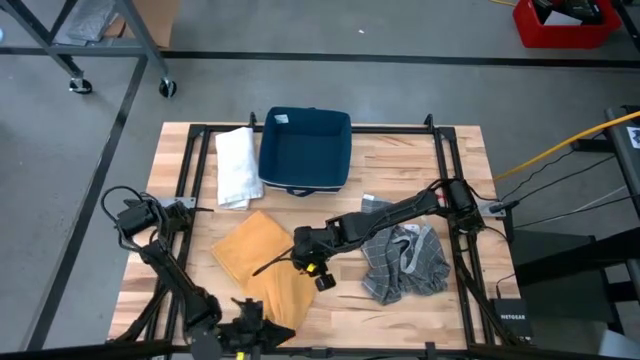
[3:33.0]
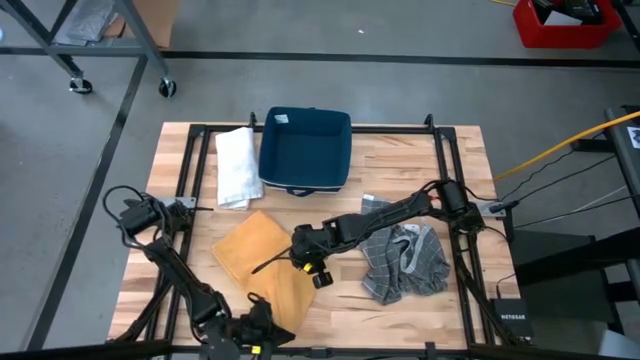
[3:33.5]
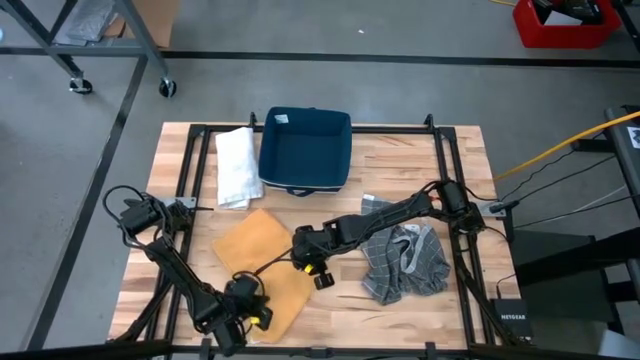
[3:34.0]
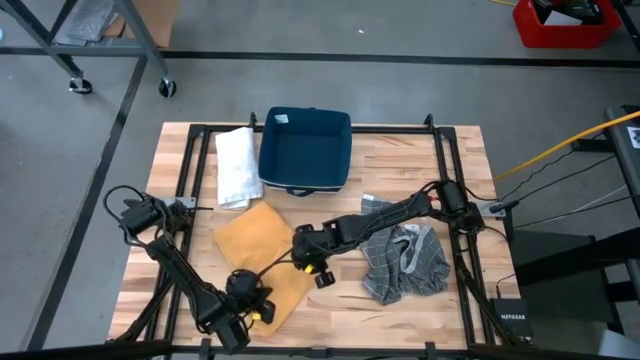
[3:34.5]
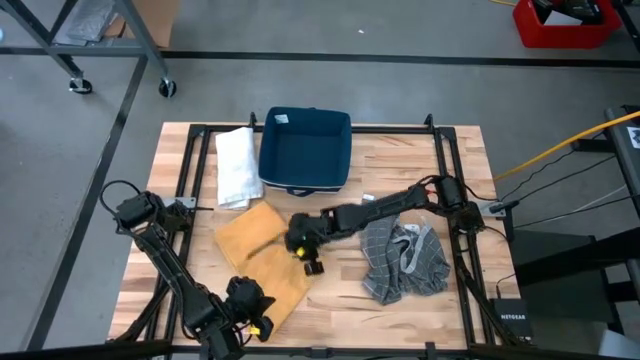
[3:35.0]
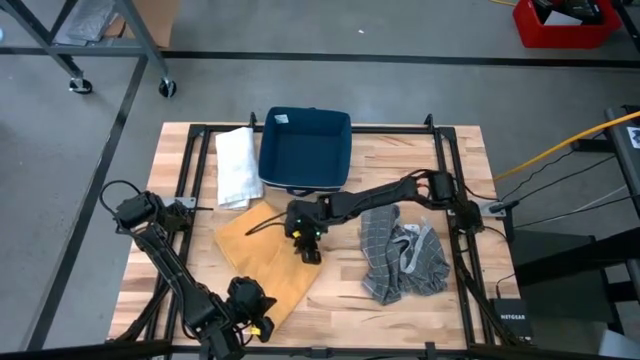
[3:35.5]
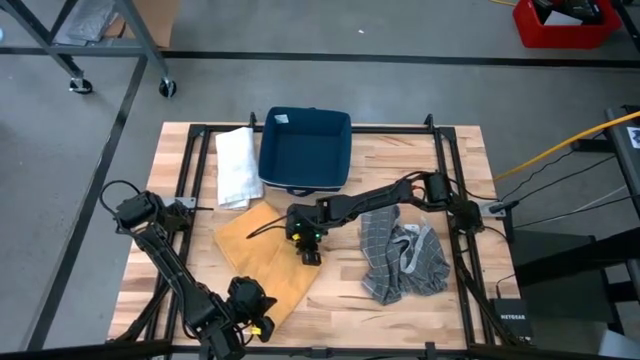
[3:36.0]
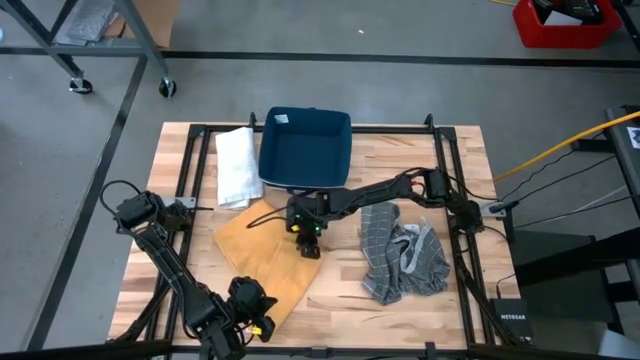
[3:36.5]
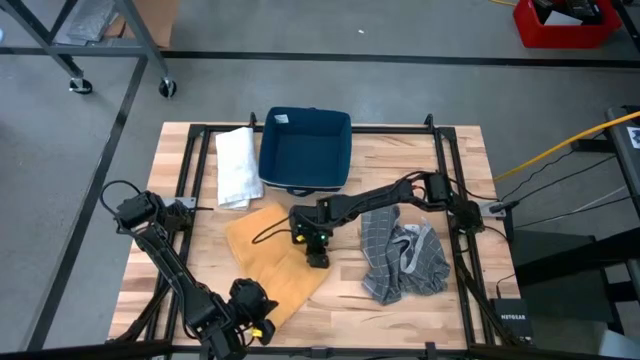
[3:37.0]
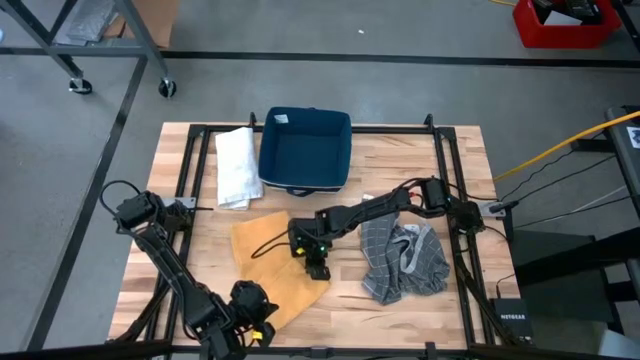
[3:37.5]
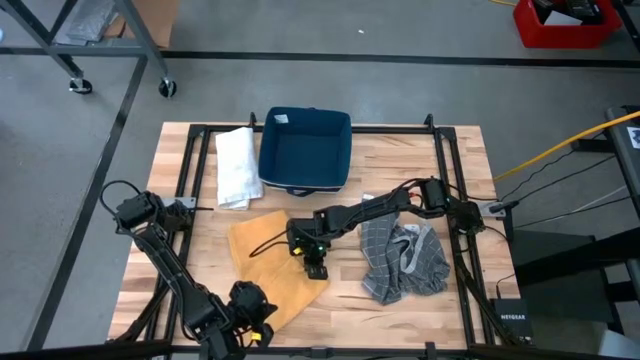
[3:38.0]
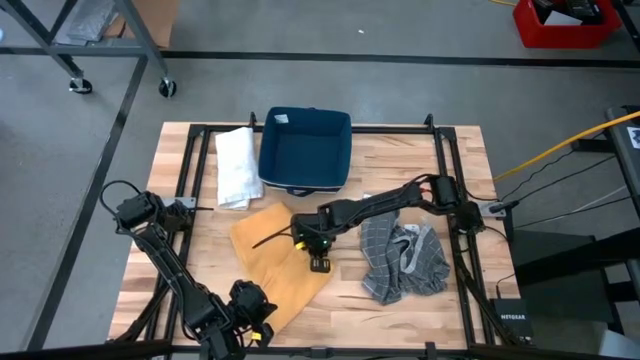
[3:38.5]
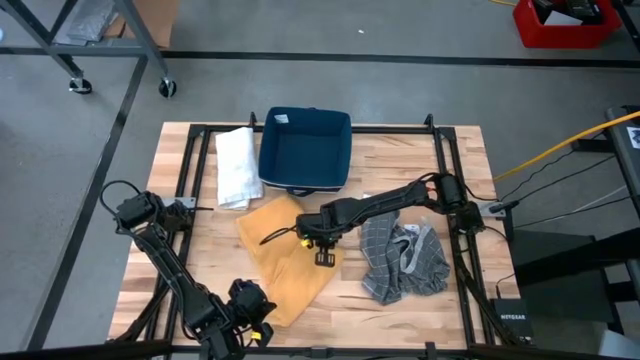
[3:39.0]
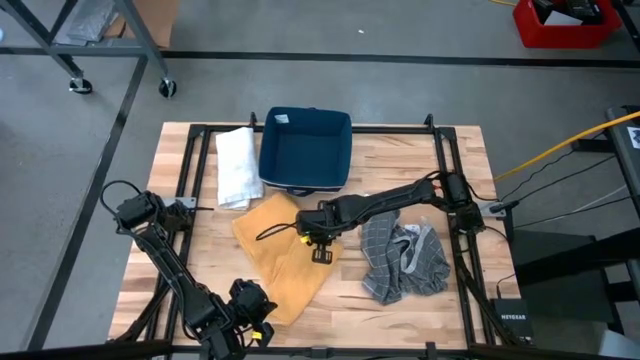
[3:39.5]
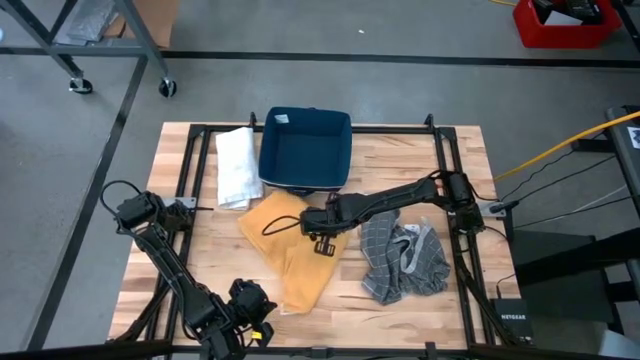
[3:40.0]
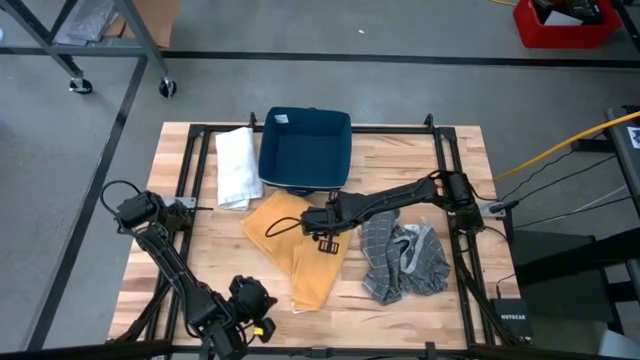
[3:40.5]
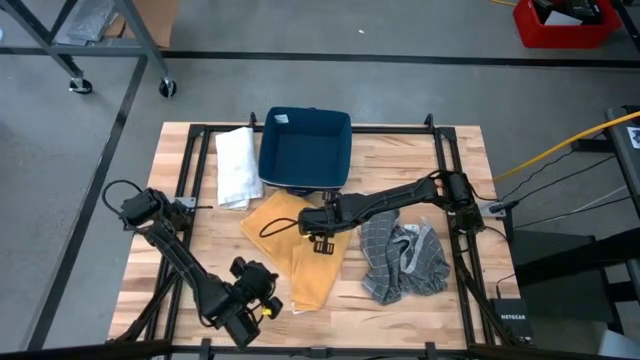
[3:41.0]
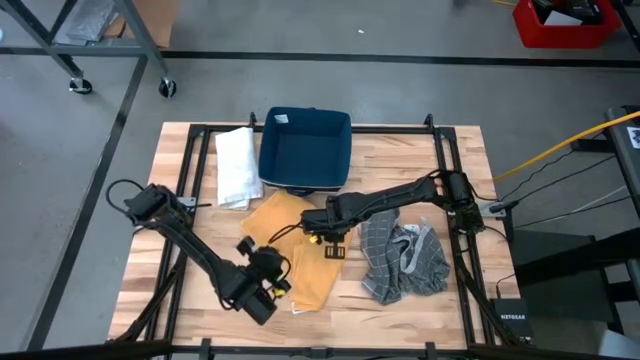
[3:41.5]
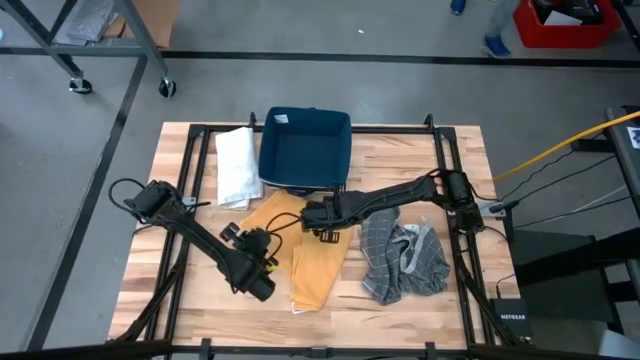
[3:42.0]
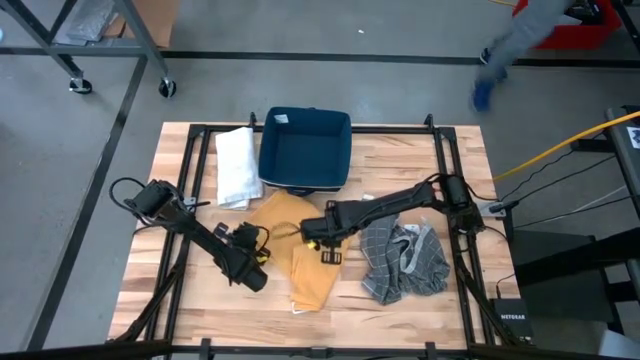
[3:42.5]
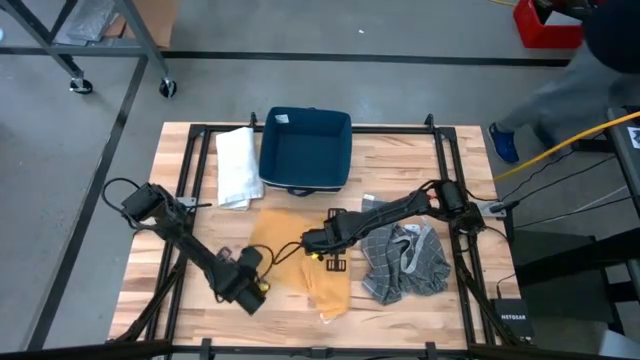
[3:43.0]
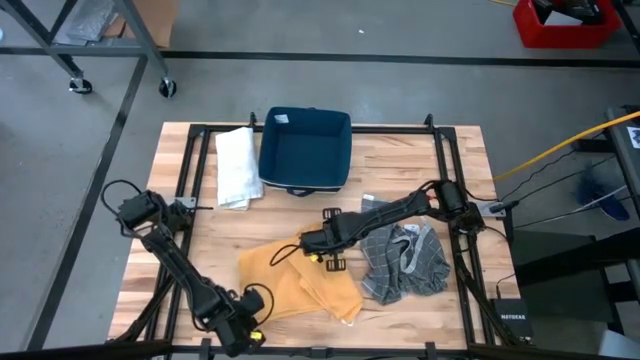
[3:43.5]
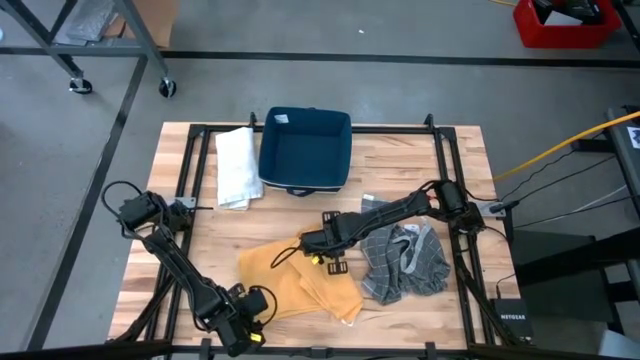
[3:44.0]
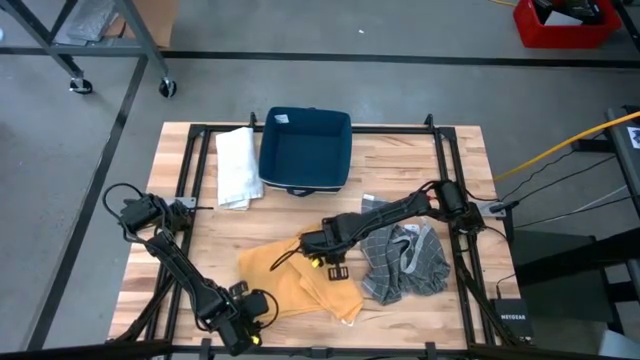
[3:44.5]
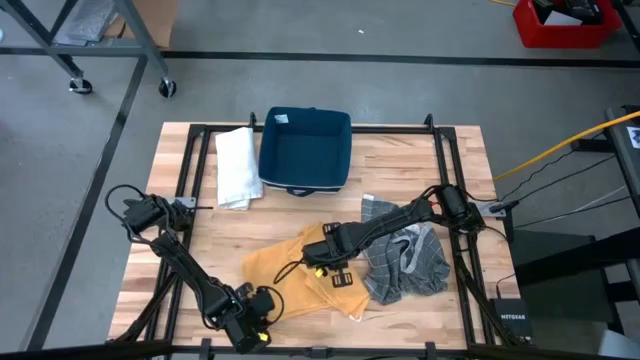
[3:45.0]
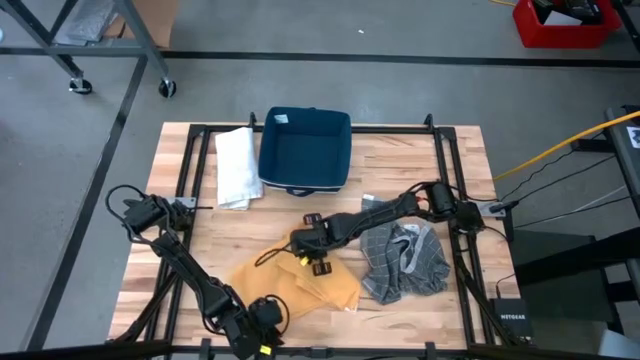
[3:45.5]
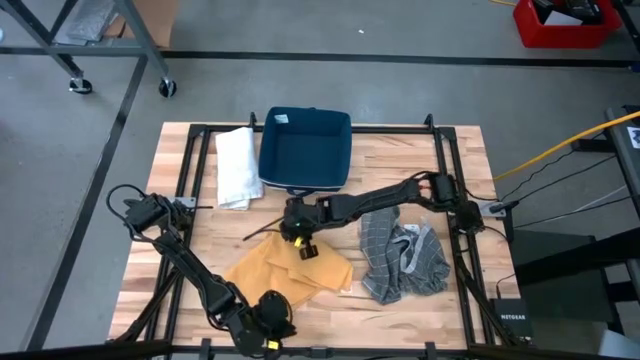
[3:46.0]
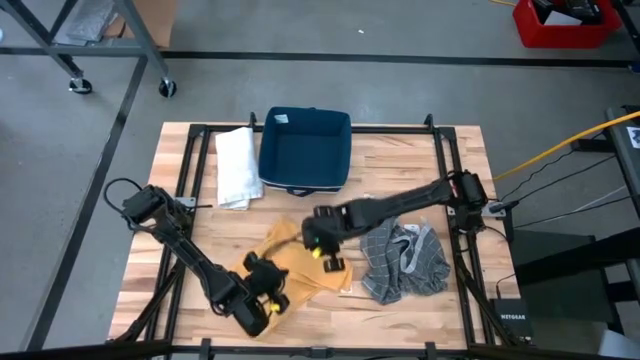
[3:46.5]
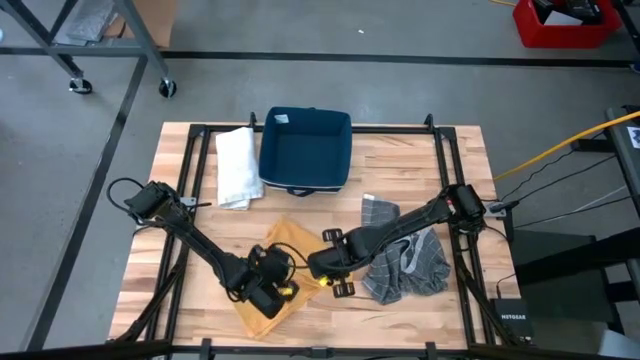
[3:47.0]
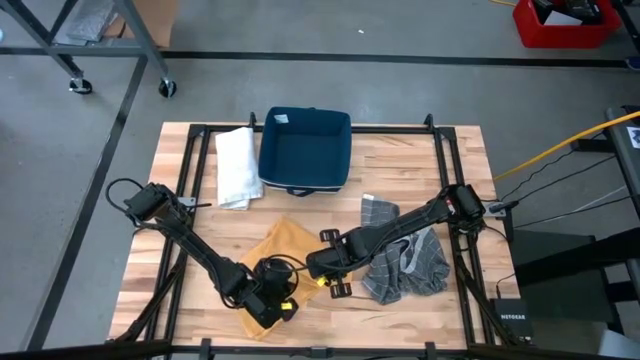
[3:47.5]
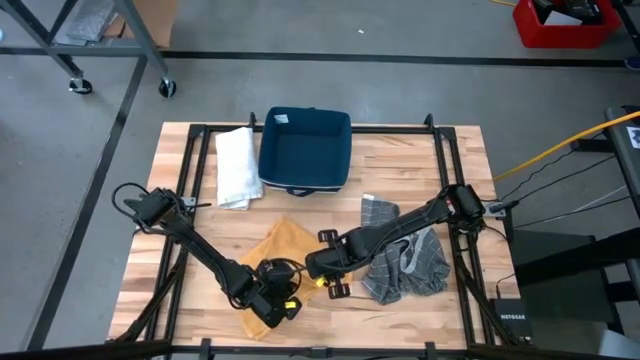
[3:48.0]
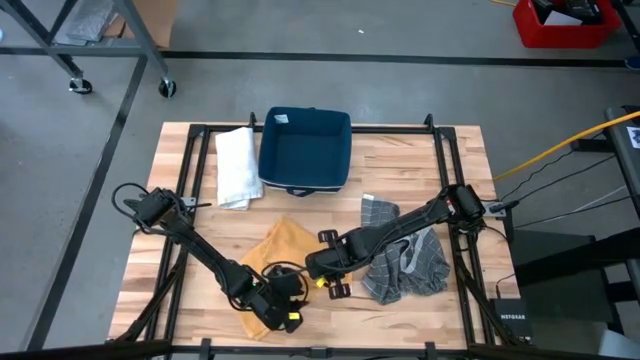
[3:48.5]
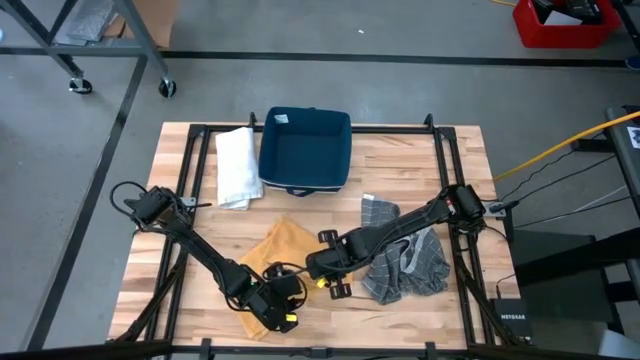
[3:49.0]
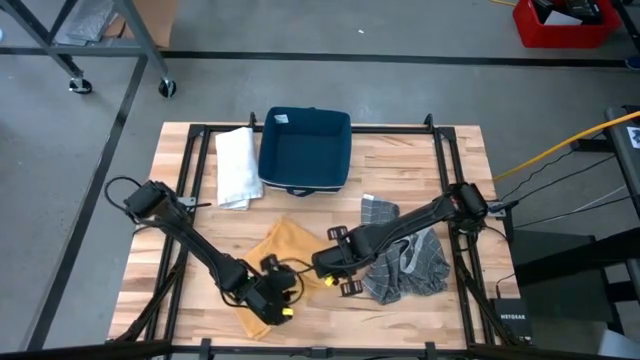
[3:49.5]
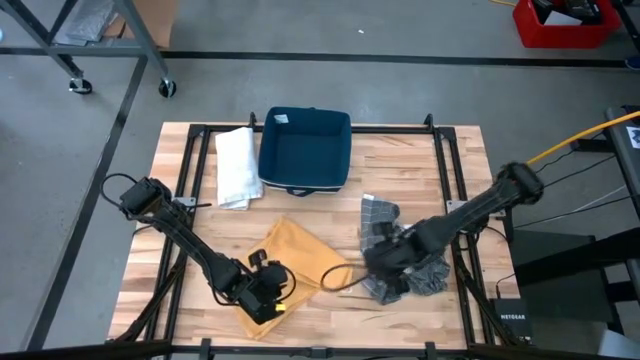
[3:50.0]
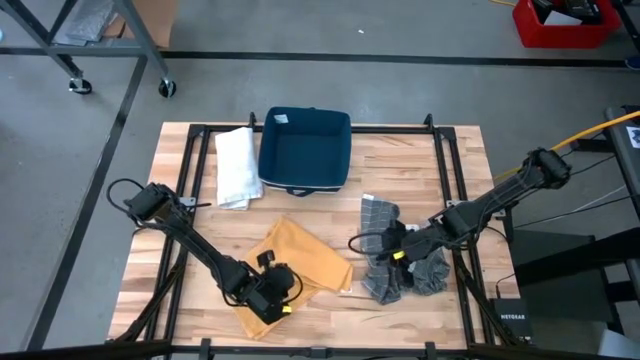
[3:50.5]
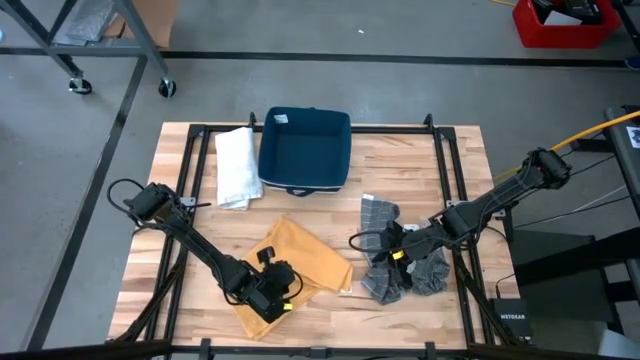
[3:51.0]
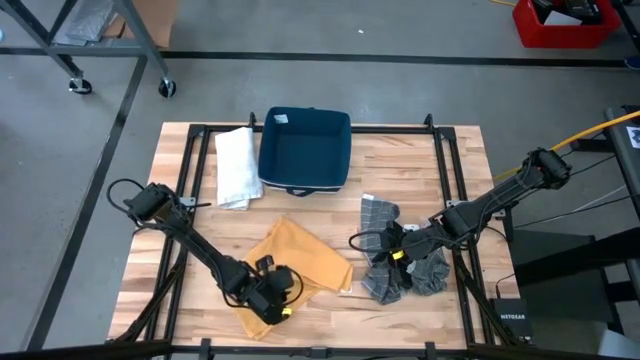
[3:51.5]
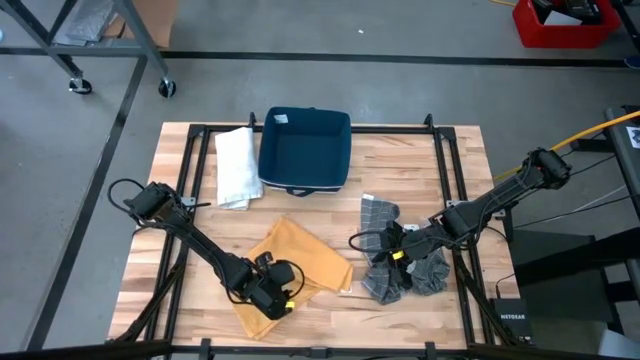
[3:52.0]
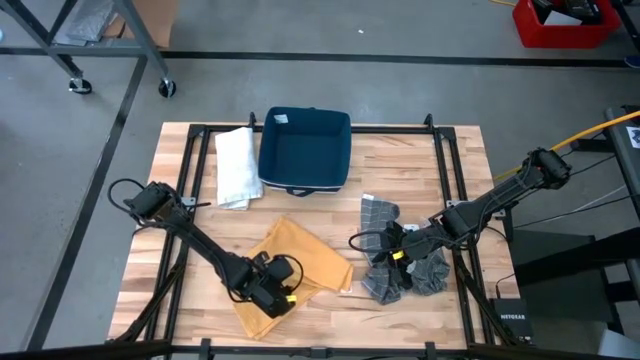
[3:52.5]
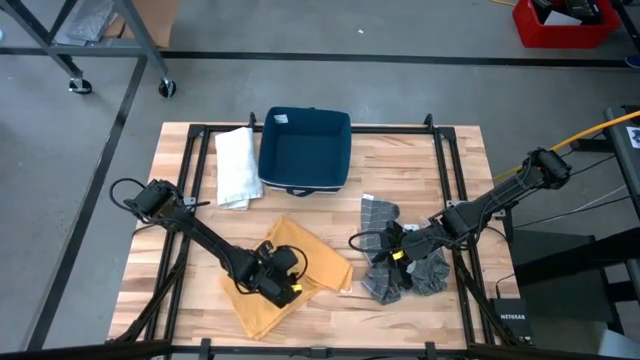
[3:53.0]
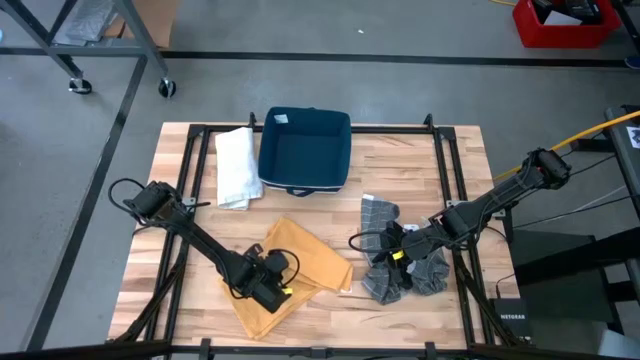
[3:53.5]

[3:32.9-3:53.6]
Task: Fold towel
Fold the yellow towel

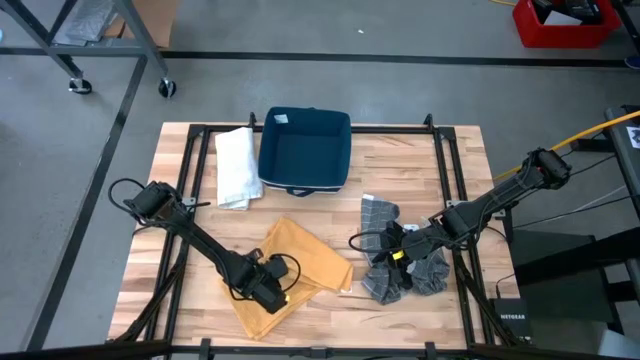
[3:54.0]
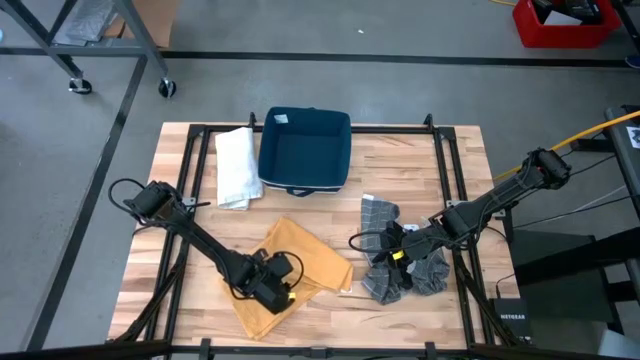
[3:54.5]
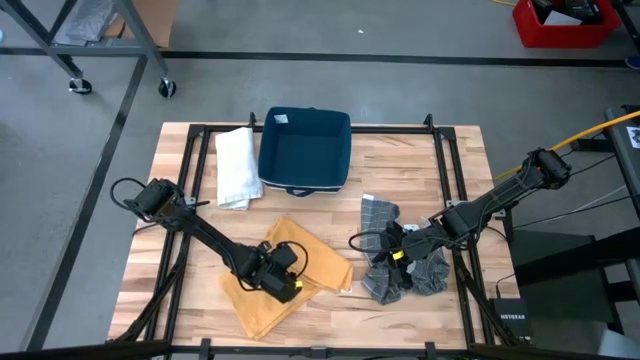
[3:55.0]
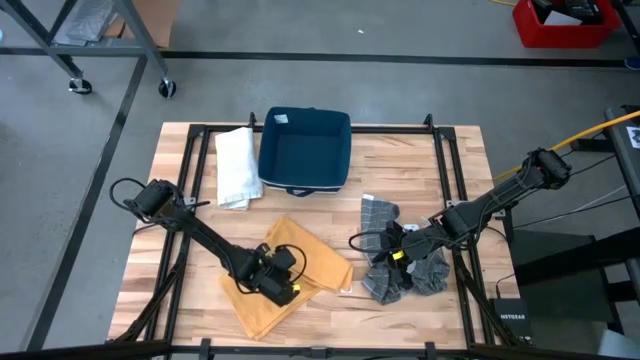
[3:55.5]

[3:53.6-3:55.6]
Fold the yellow towel
